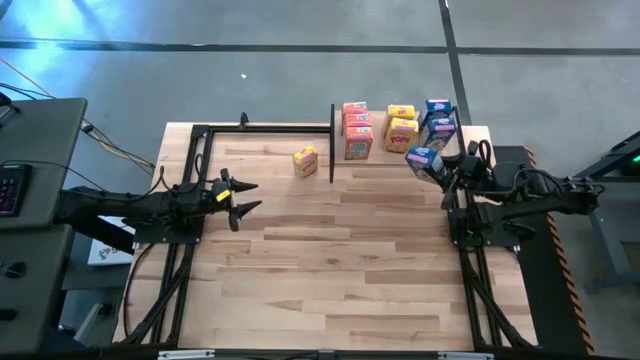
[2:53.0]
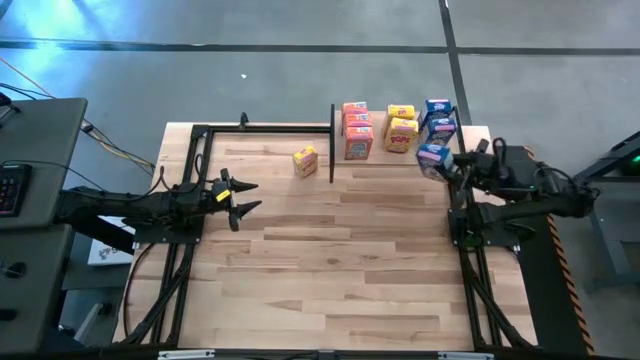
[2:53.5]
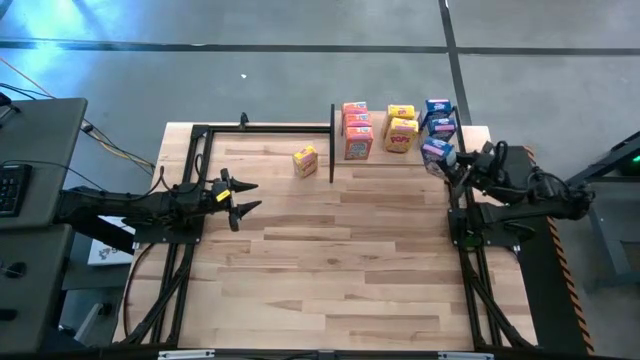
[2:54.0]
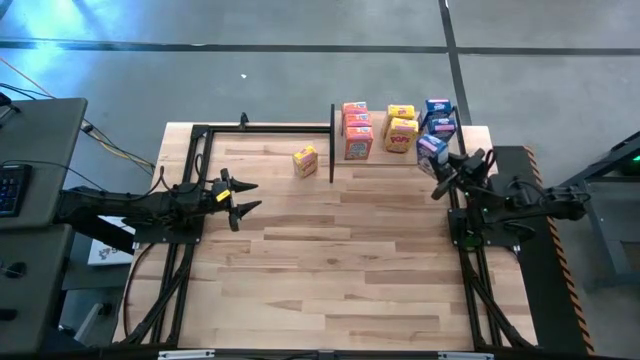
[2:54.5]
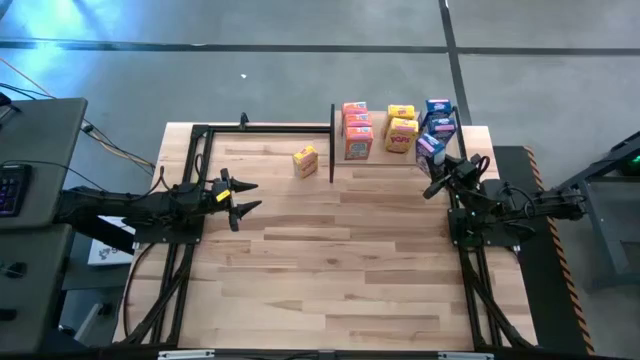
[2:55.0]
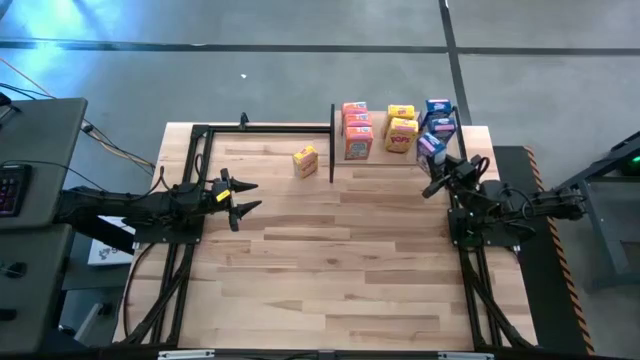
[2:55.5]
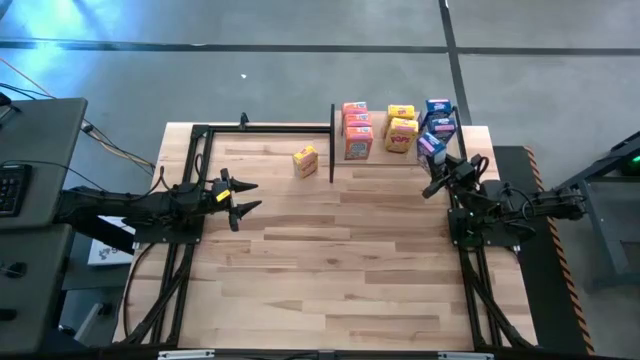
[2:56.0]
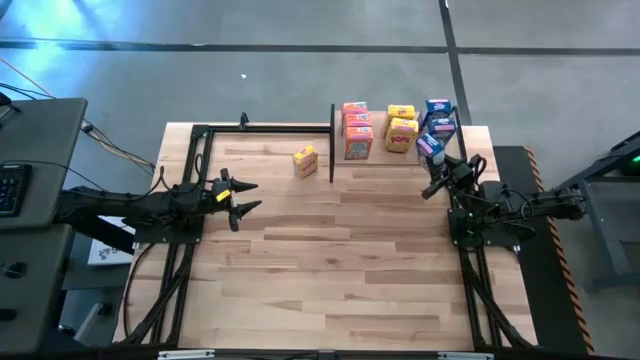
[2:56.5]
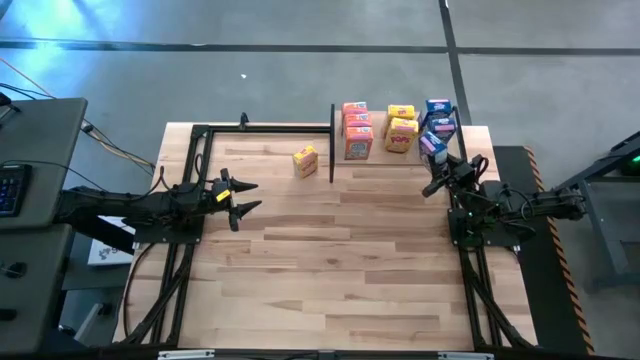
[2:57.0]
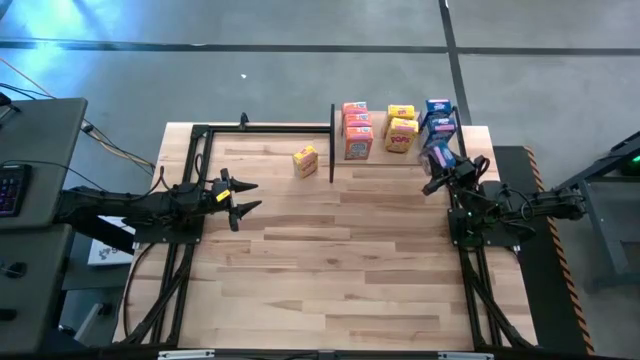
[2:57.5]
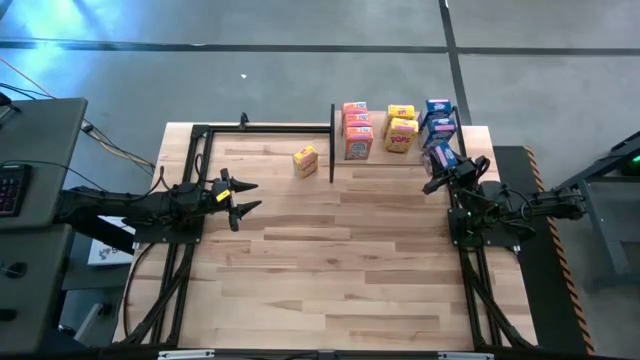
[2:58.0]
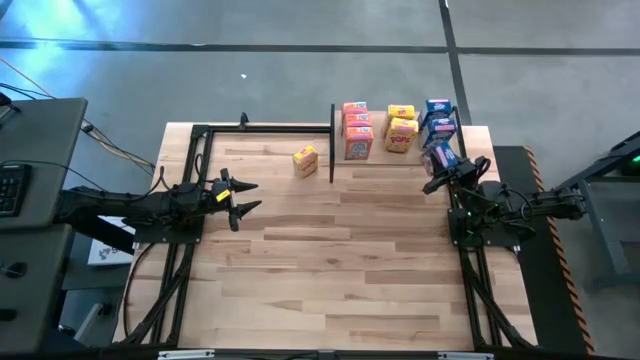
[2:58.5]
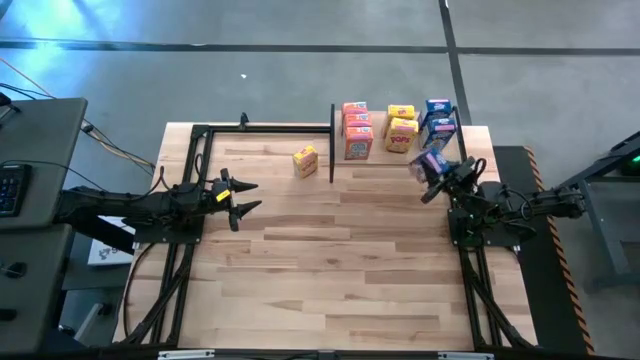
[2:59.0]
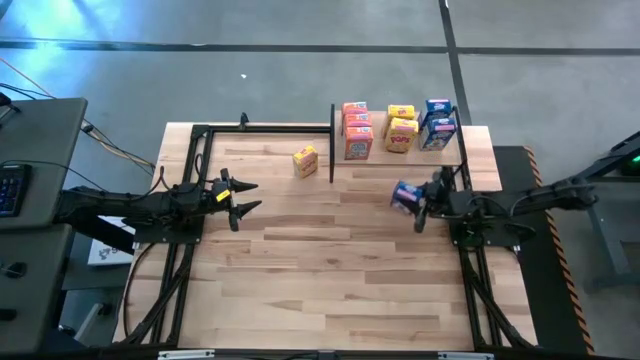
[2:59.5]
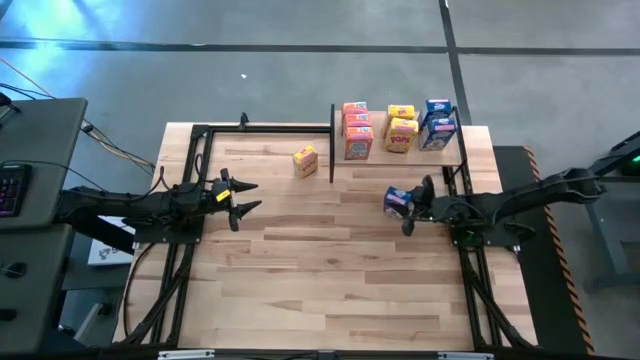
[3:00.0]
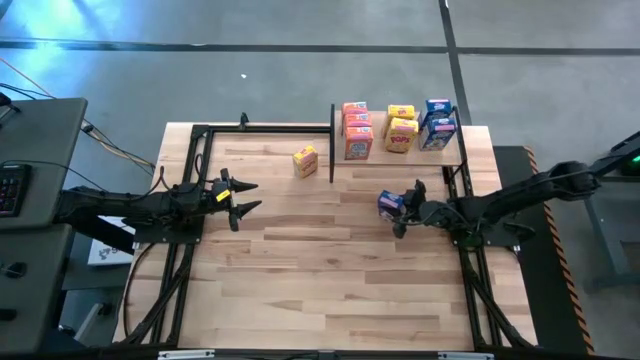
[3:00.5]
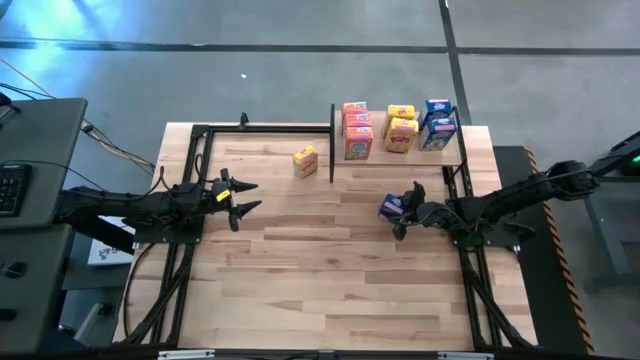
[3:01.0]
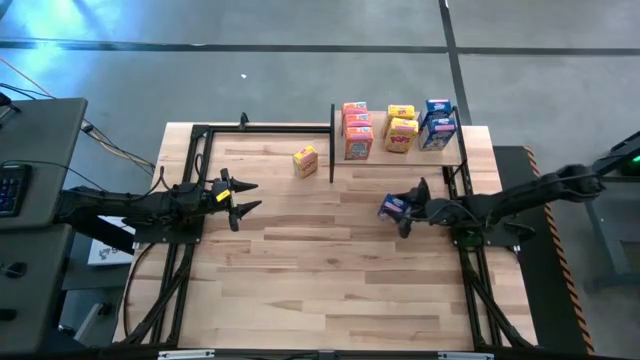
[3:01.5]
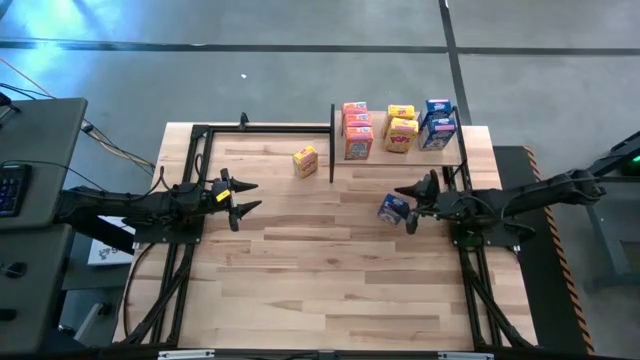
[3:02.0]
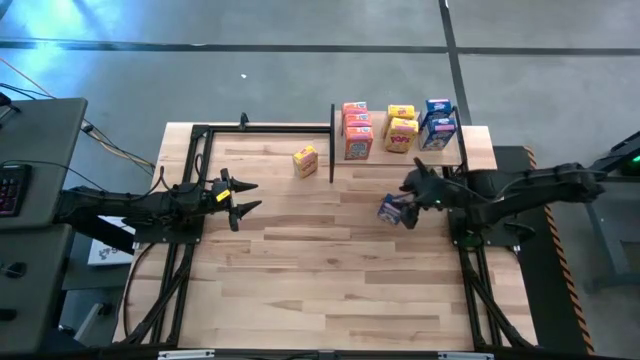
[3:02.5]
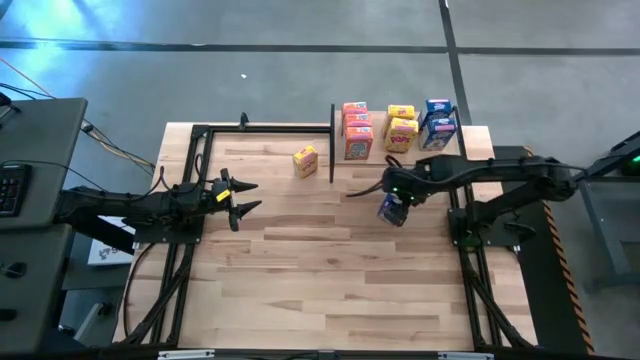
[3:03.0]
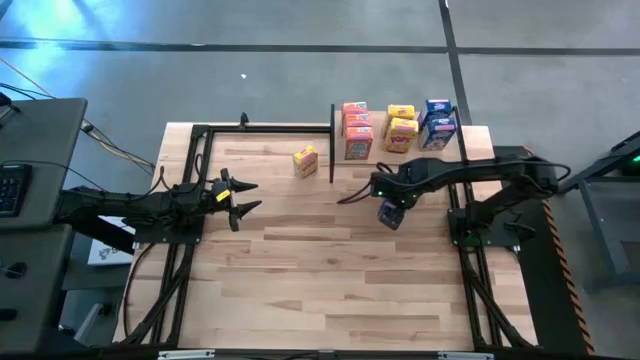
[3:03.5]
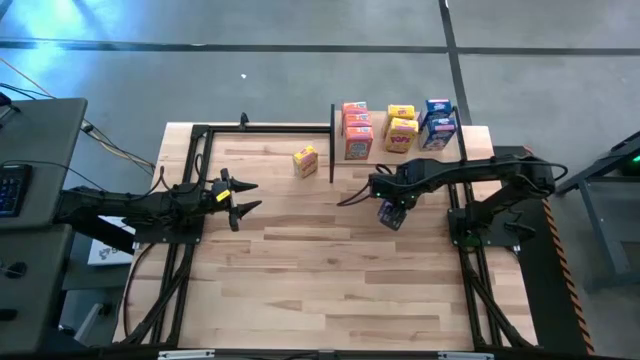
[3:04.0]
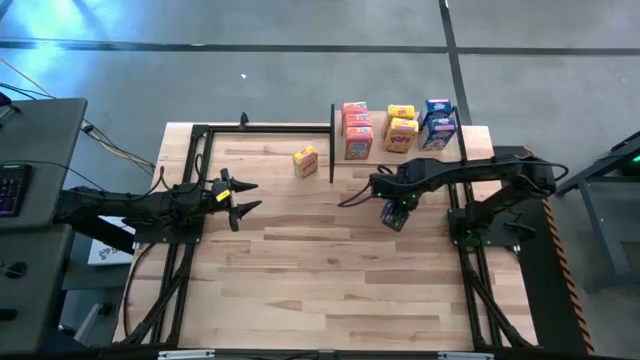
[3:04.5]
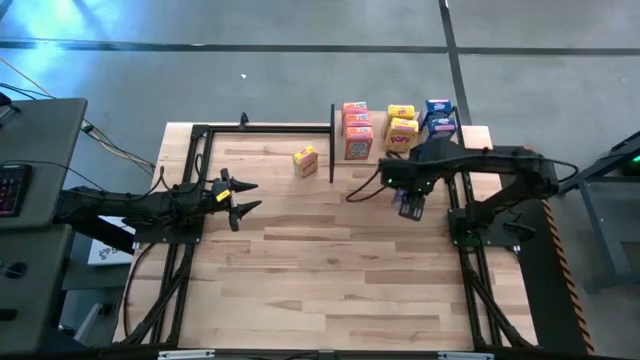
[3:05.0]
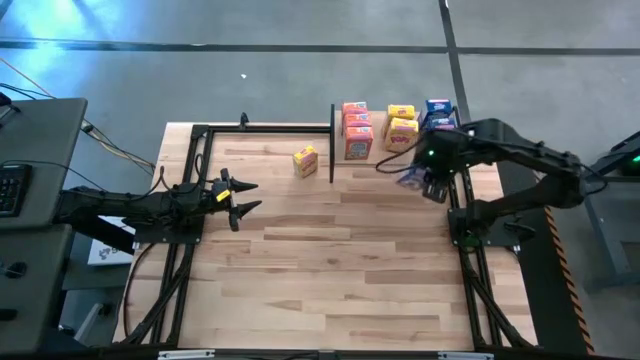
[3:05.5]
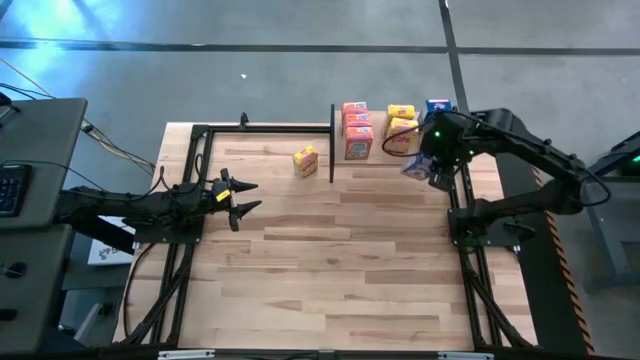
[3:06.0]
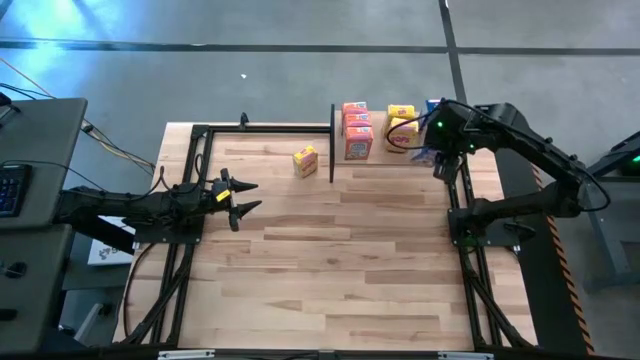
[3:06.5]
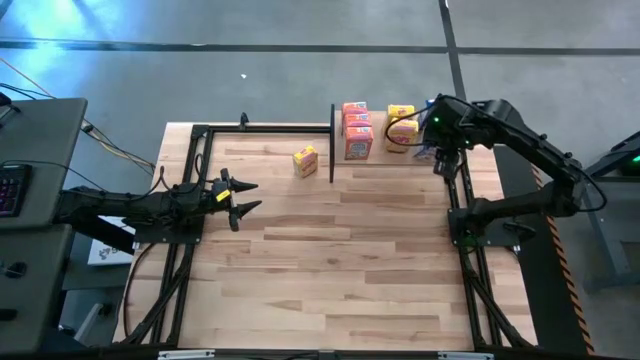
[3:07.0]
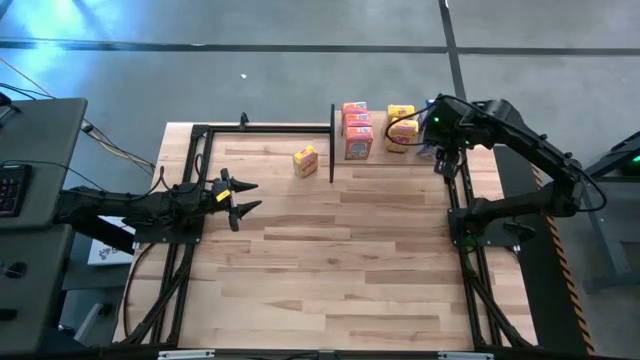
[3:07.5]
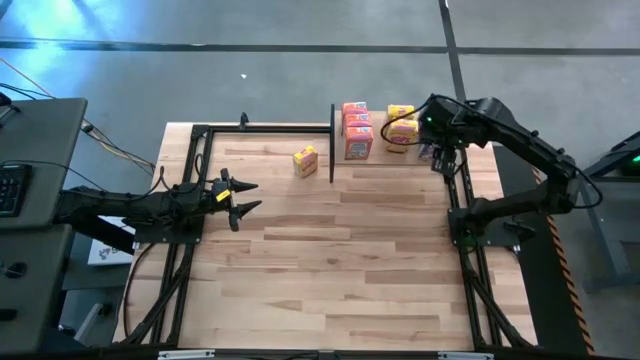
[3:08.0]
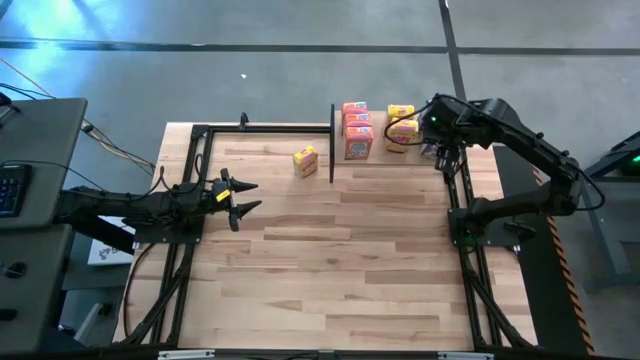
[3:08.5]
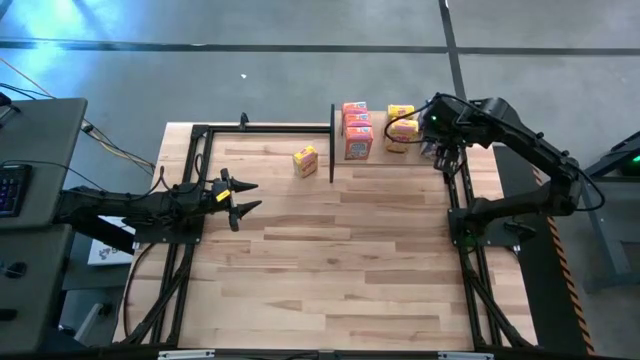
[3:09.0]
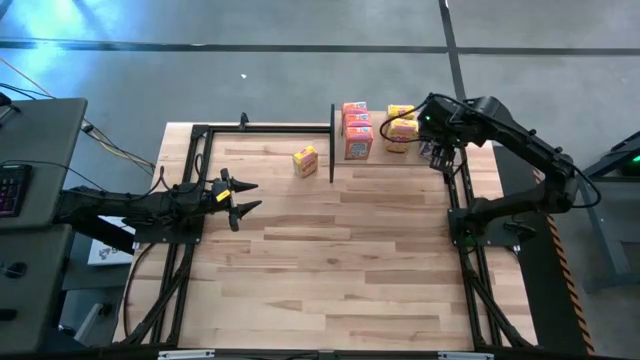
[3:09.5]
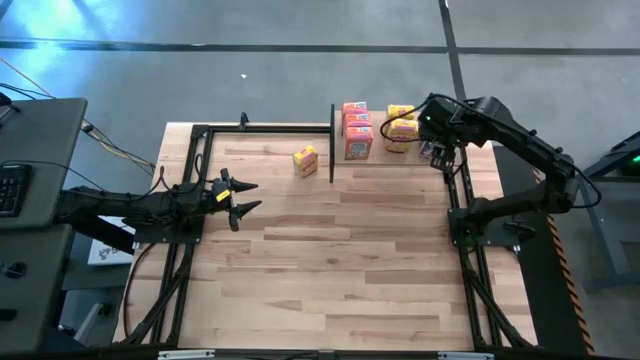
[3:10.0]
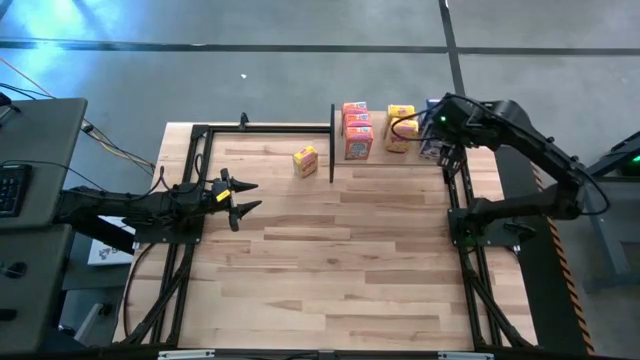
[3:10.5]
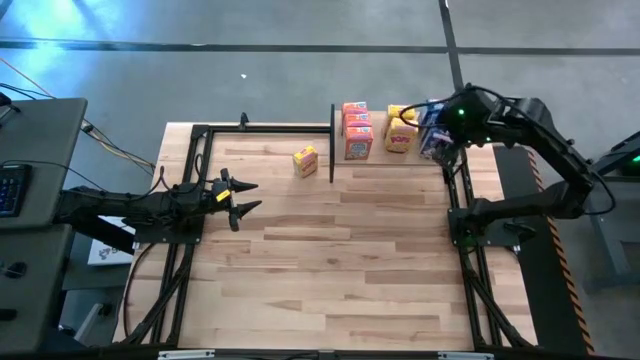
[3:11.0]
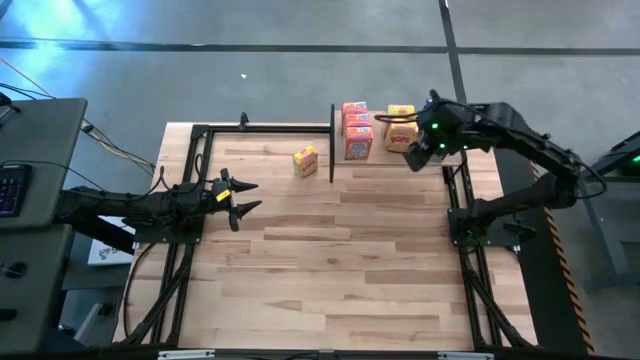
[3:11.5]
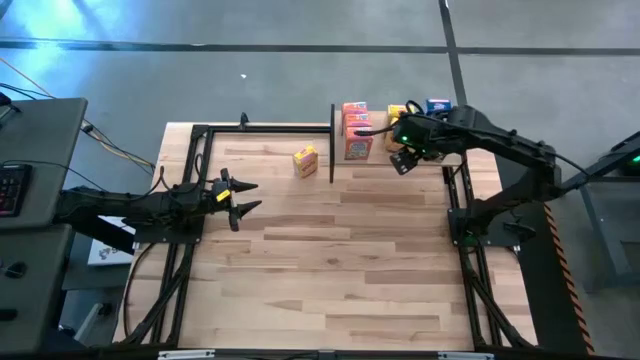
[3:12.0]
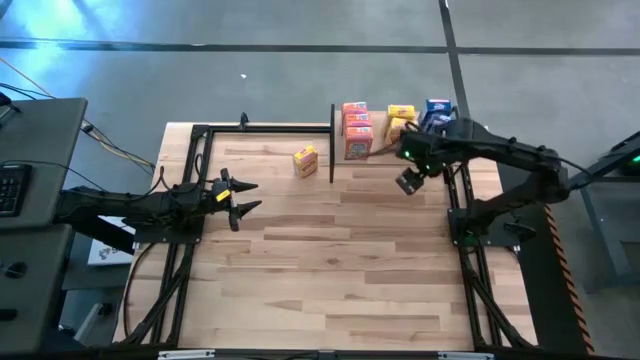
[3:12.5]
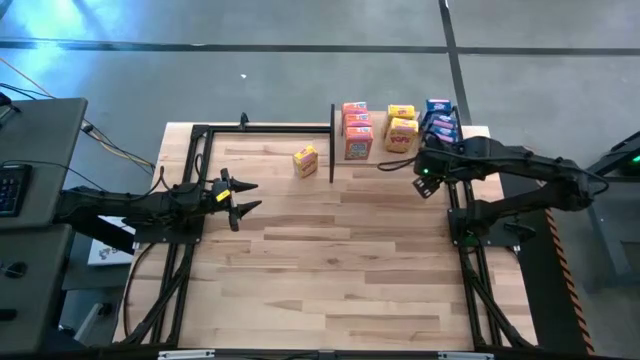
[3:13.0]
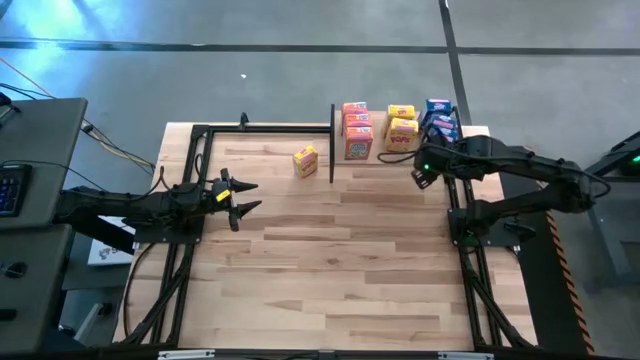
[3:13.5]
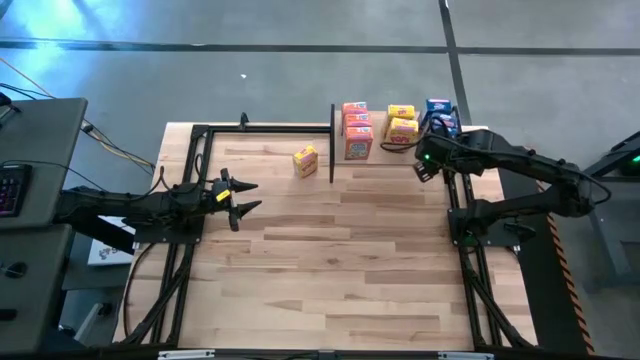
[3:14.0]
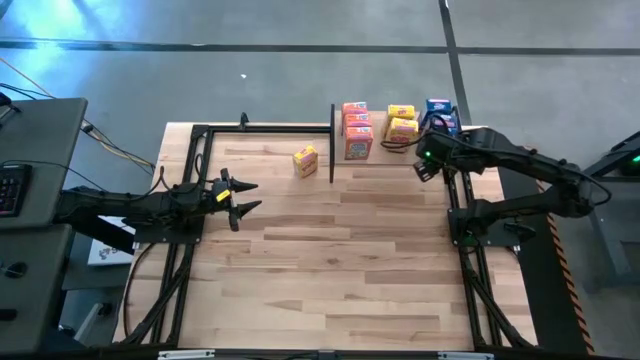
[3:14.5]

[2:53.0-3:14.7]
Task: Stack cereal on shelf
Put the blue cereal box on the shelf aligned with the other blue cereal boxes
